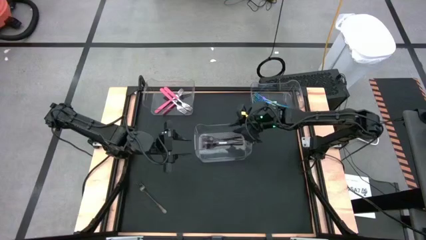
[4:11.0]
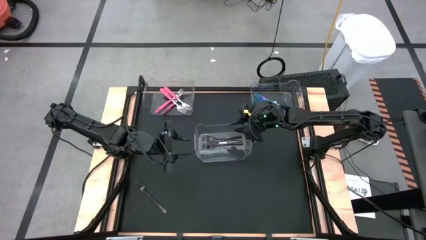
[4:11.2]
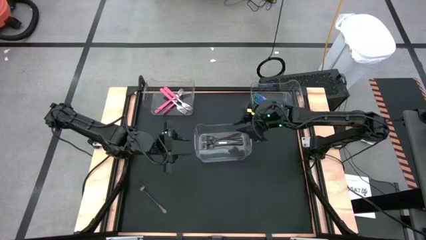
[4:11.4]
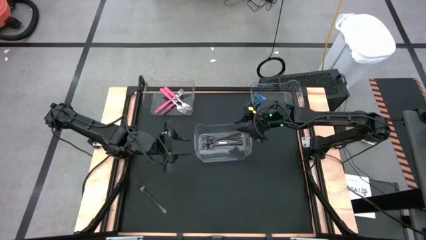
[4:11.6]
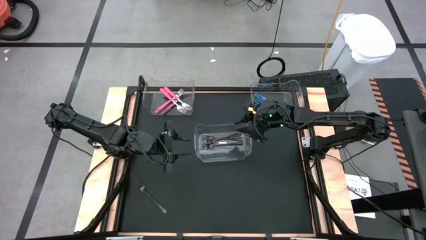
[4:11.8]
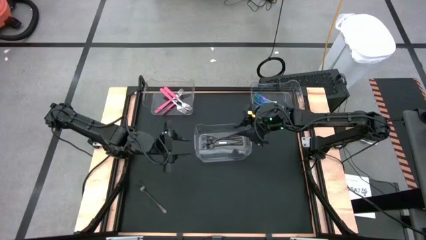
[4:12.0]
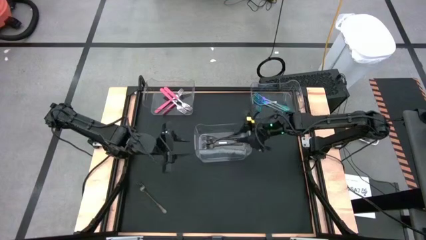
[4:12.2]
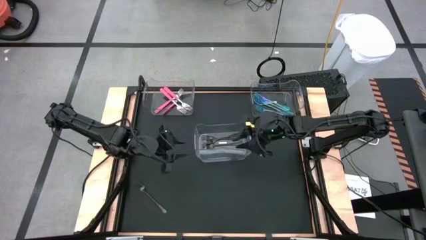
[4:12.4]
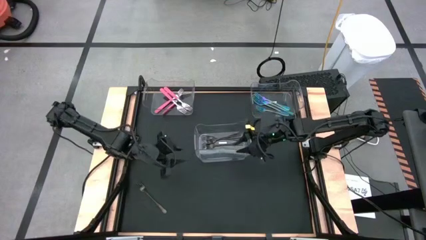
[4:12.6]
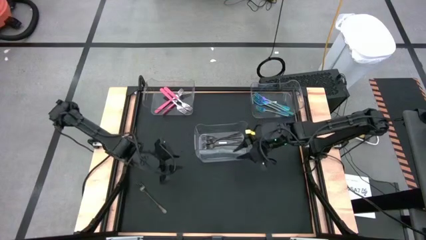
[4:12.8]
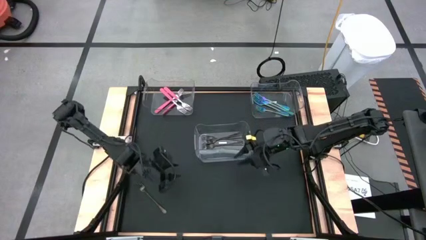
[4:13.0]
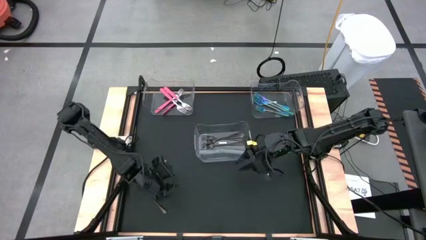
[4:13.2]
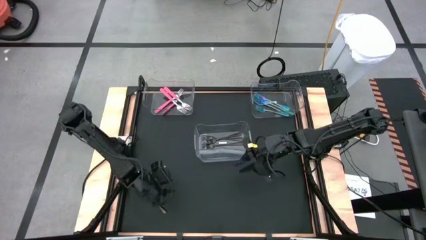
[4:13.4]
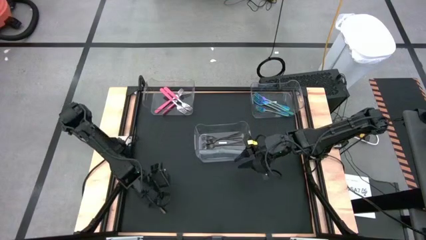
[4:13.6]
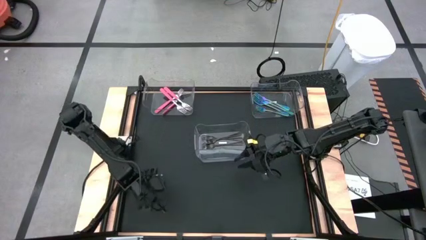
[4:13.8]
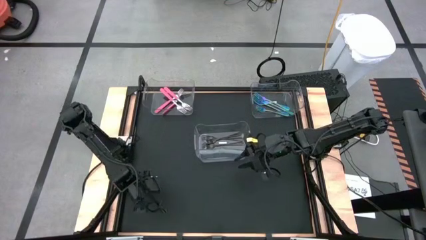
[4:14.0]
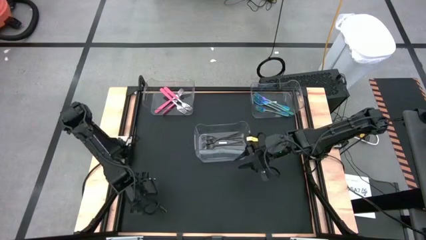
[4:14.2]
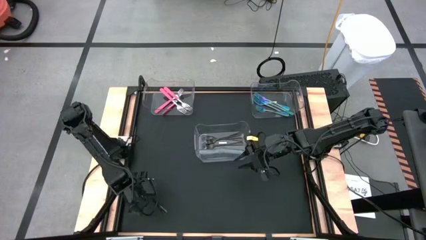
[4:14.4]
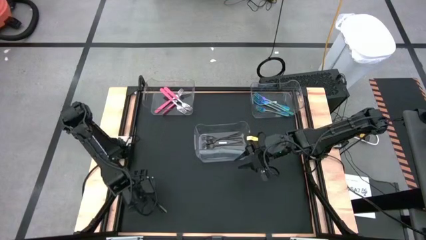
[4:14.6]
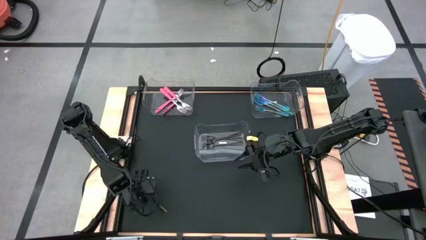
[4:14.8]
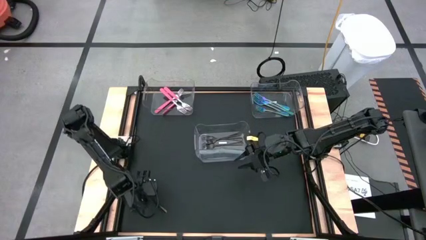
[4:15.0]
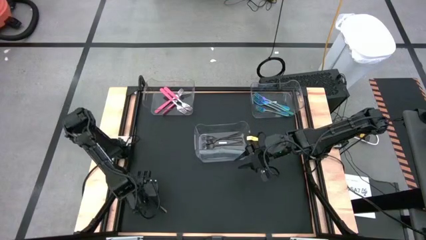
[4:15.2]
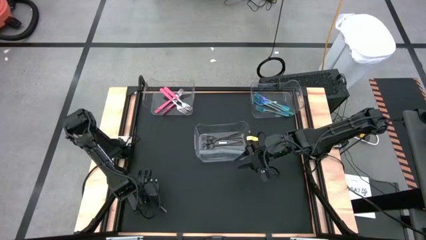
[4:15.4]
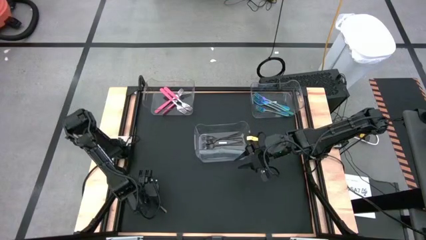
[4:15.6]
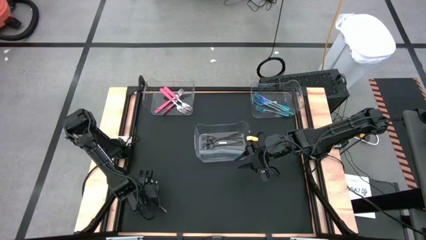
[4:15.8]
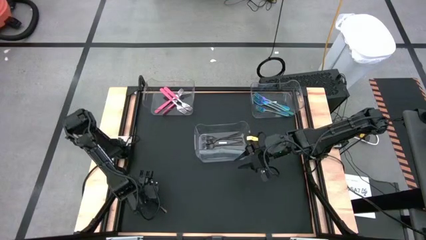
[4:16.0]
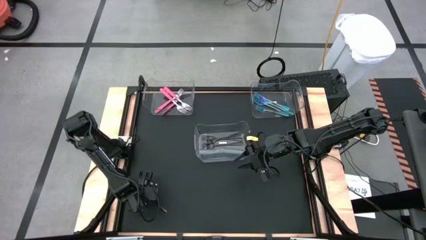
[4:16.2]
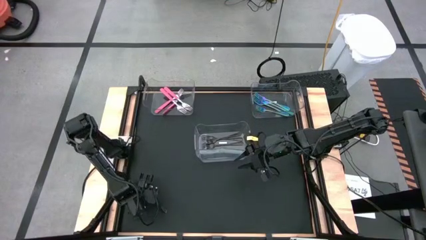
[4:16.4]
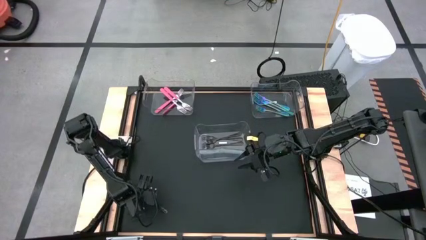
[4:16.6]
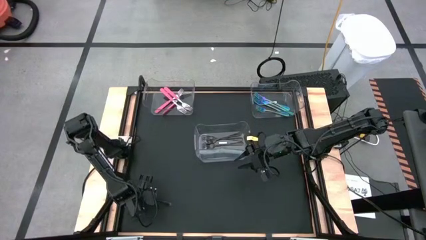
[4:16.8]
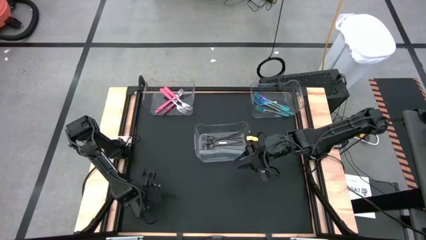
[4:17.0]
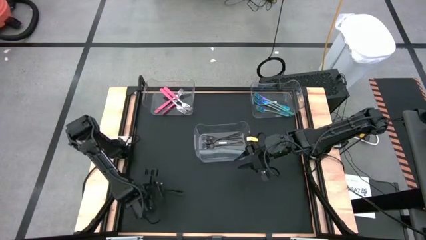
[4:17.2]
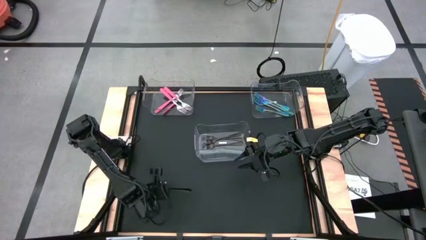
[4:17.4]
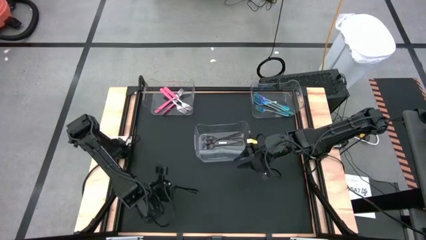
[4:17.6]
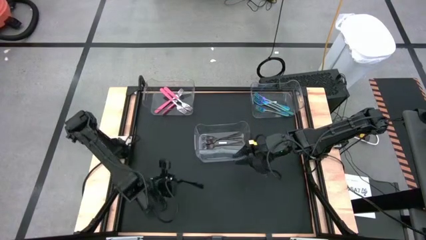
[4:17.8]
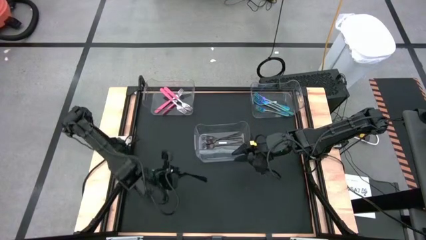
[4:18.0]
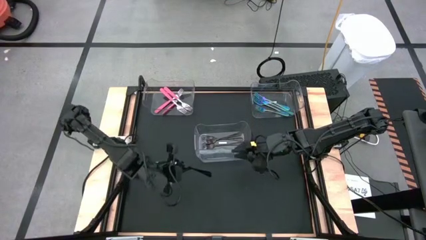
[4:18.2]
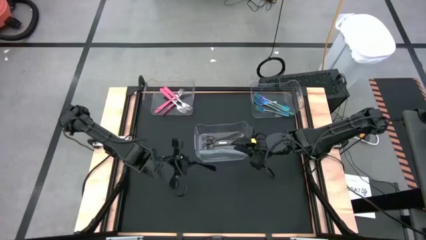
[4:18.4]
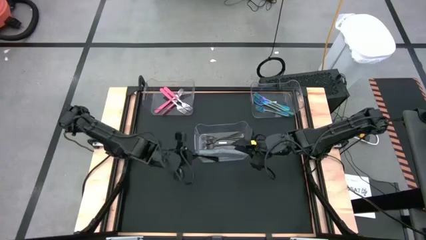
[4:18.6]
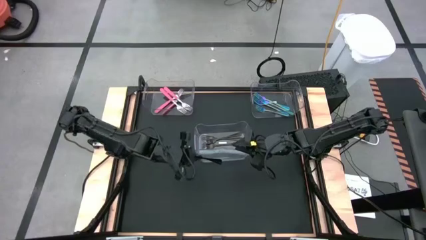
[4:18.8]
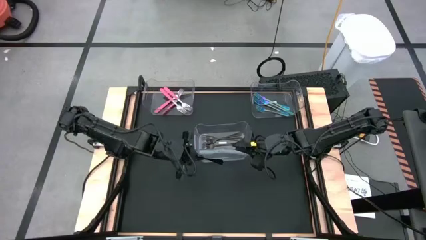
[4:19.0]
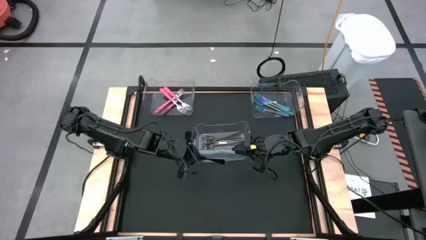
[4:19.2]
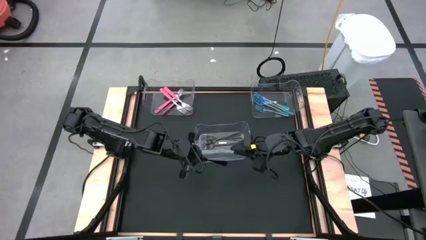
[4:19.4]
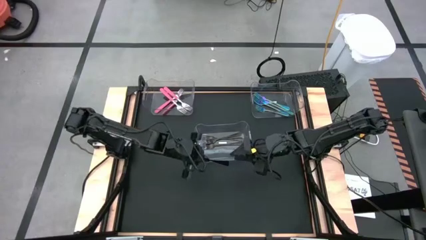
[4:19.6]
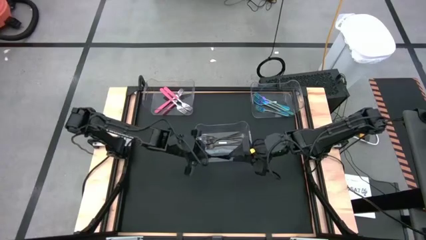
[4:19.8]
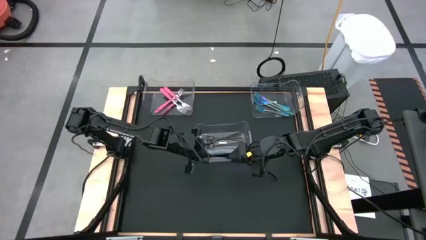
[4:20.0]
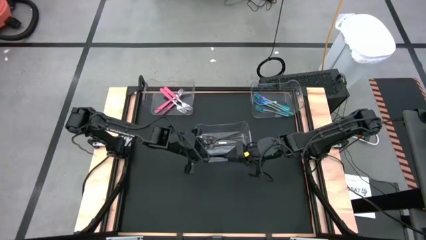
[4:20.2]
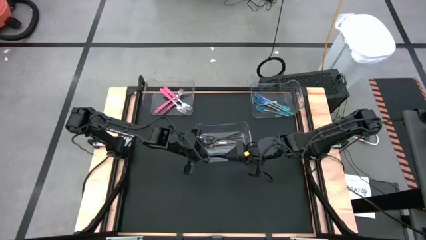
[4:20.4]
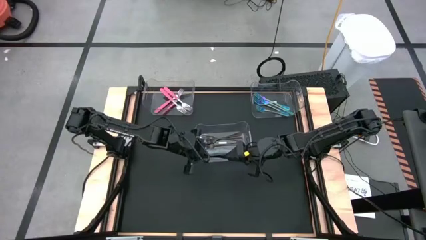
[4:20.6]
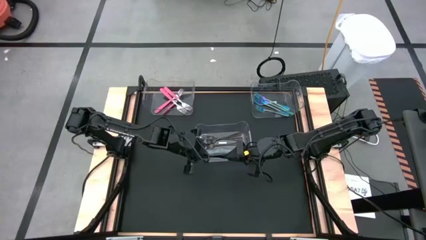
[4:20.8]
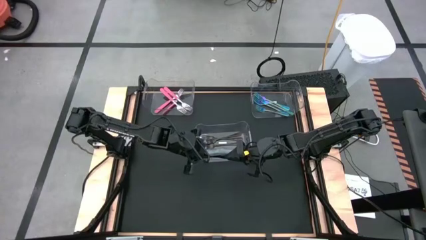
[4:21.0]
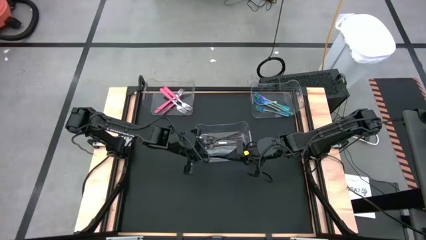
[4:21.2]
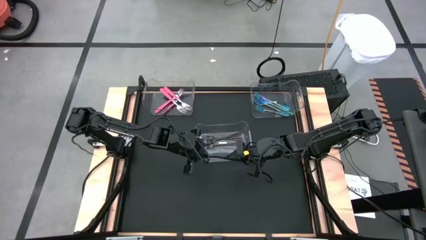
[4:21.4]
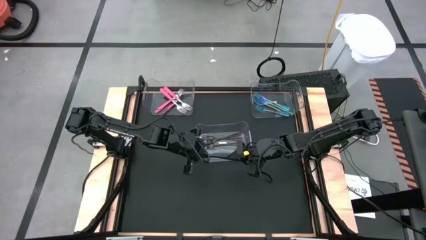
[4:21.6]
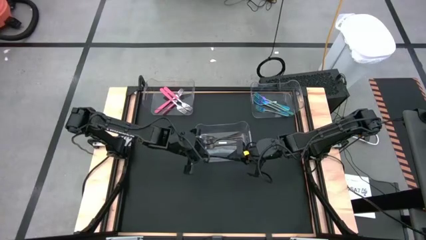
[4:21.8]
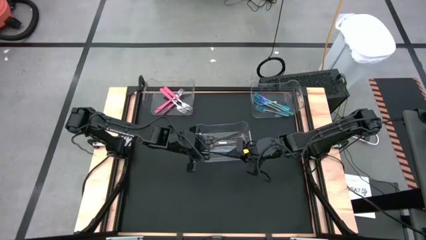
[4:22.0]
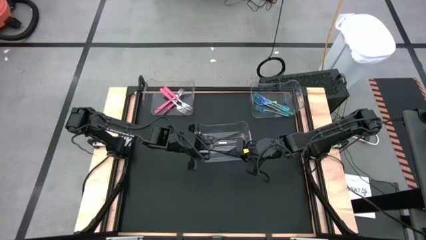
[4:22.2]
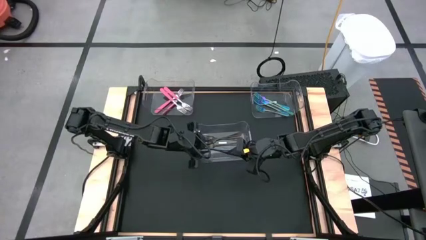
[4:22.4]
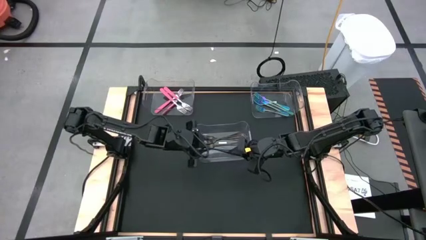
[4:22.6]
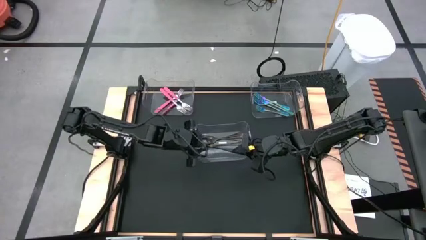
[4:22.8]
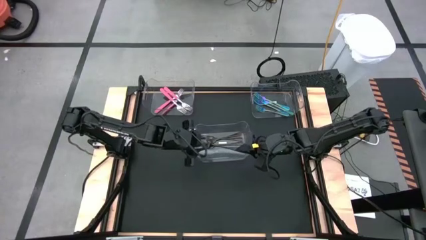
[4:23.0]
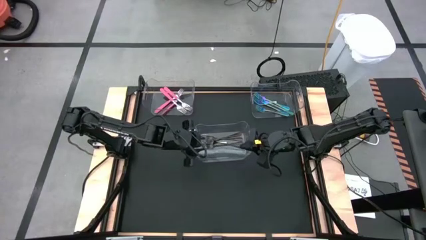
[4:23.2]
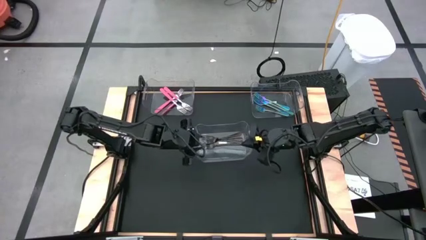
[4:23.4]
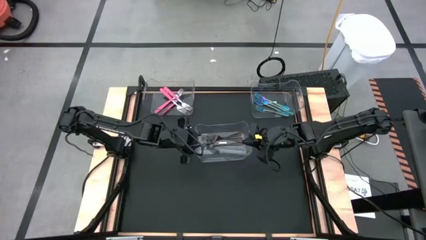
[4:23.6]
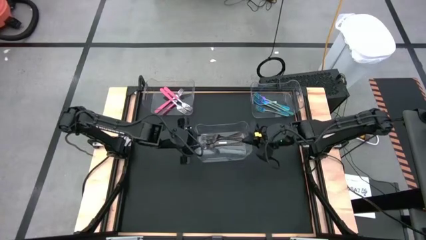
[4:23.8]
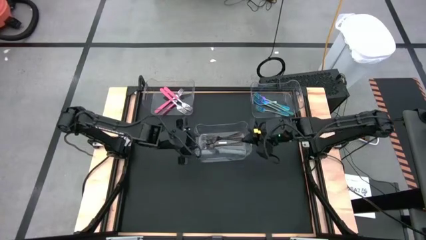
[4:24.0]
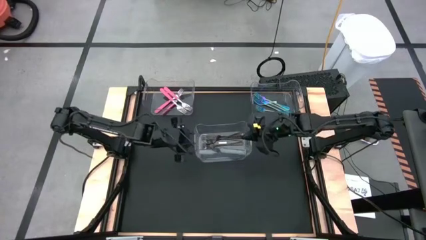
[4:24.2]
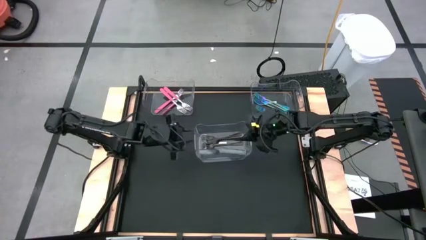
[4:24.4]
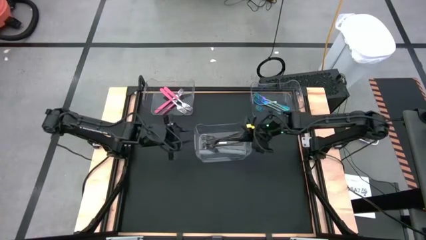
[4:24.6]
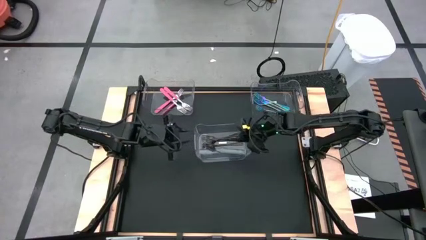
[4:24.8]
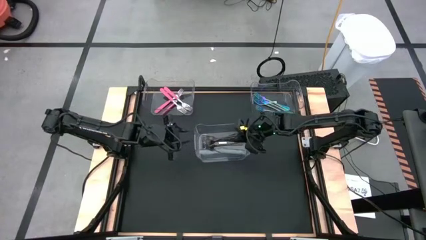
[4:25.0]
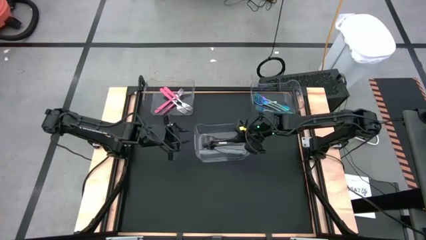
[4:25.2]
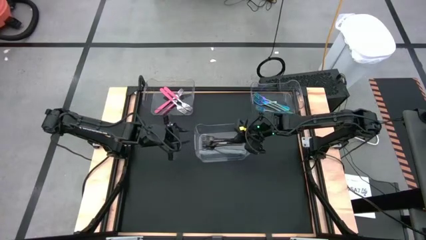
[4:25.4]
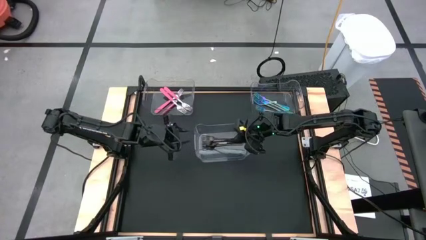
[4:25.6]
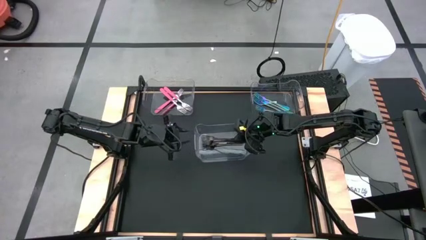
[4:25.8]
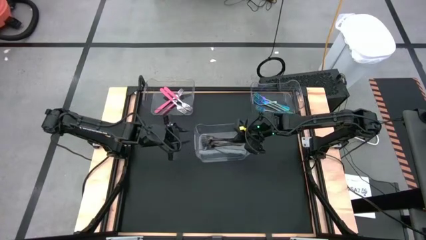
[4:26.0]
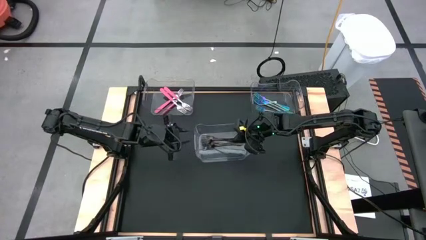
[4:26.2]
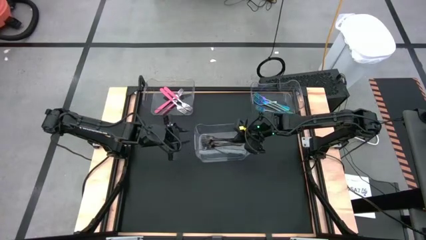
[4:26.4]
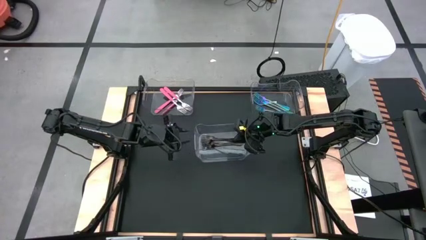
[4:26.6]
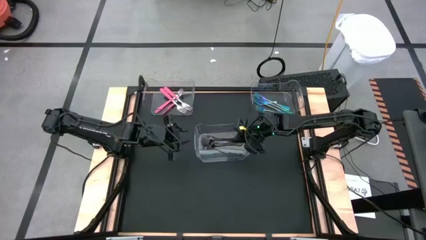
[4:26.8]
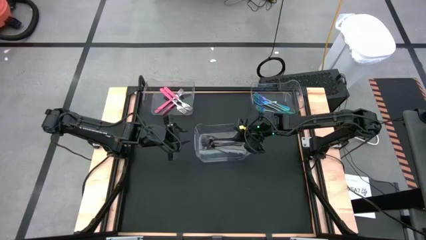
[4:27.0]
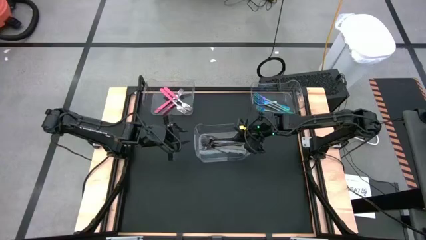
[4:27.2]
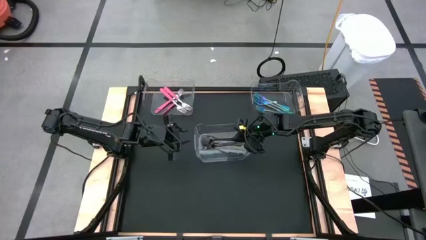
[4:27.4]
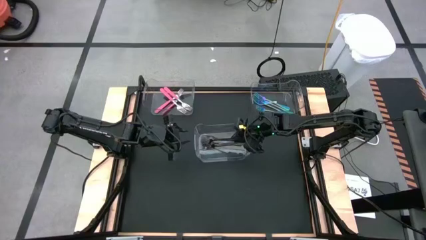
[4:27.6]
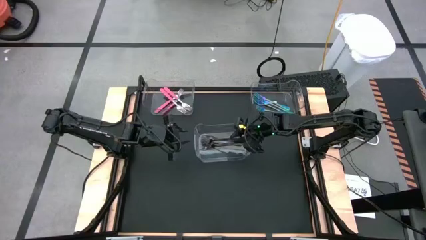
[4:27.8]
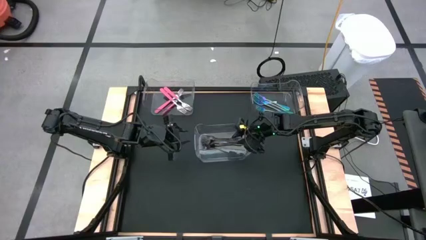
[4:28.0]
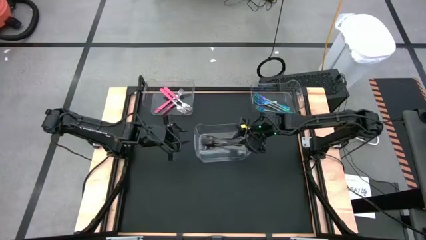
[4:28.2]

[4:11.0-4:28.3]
Task: Sort silverware by color (type)
Put the silver fork into the middle transparent bin

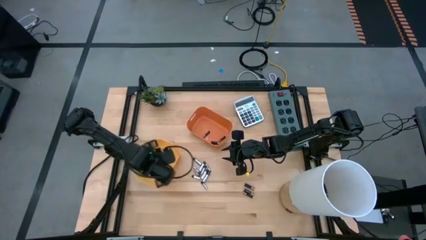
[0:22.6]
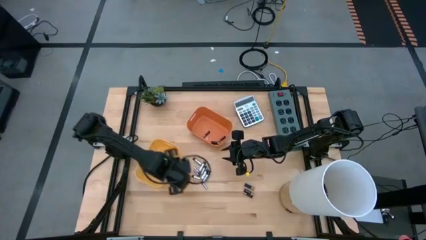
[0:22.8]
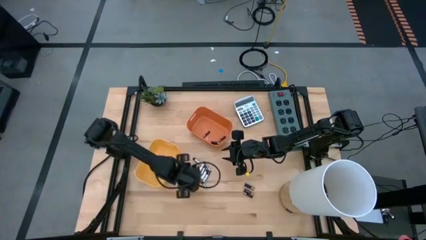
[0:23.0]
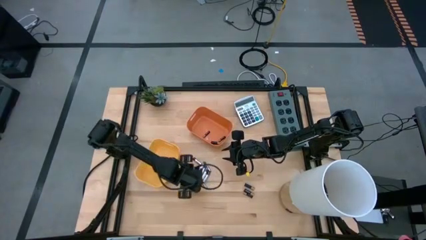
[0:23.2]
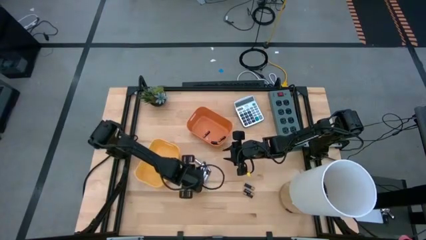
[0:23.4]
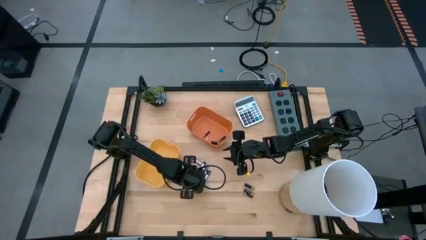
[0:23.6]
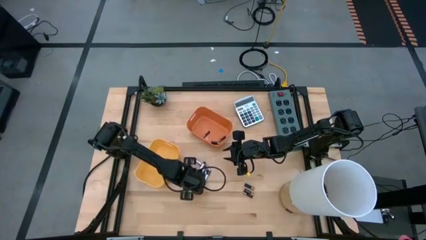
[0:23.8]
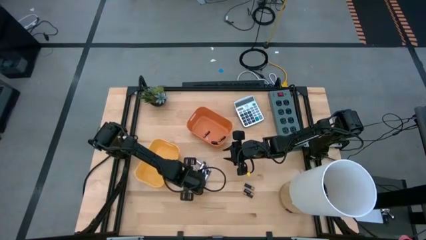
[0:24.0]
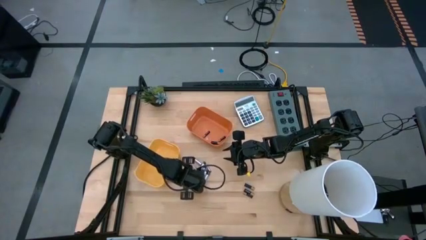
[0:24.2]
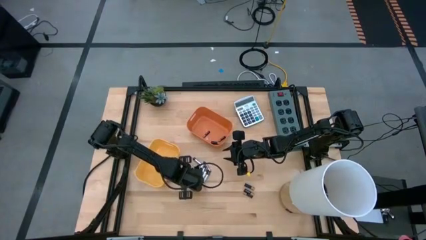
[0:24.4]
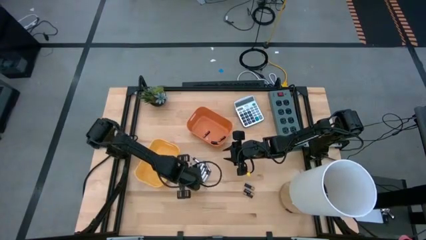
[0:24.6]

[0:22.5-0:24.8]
Task: Sort batteries
Put the silver battery into the yellow bin
